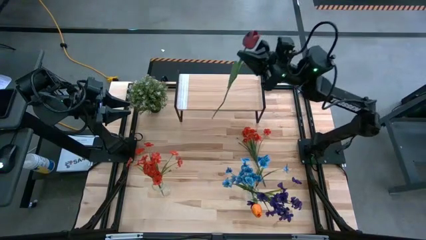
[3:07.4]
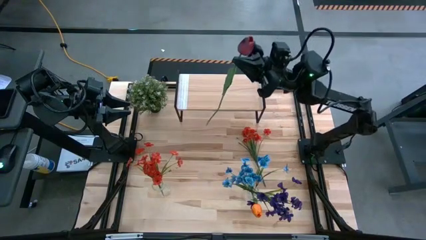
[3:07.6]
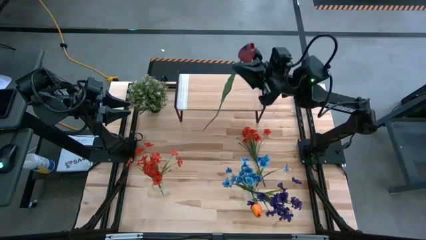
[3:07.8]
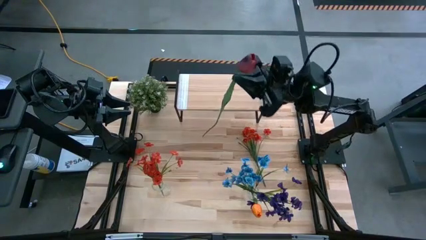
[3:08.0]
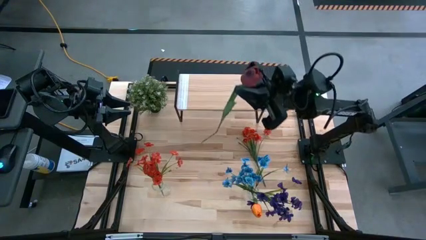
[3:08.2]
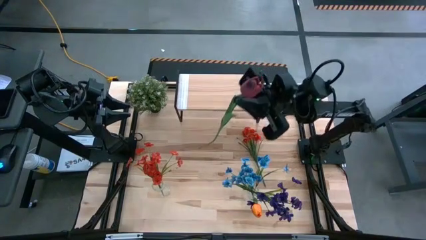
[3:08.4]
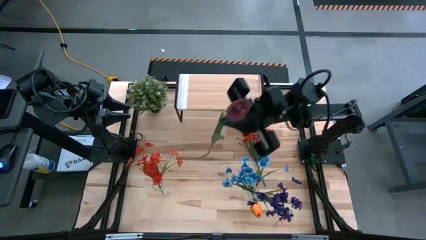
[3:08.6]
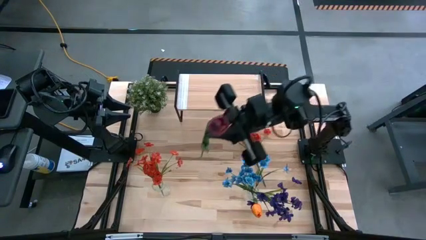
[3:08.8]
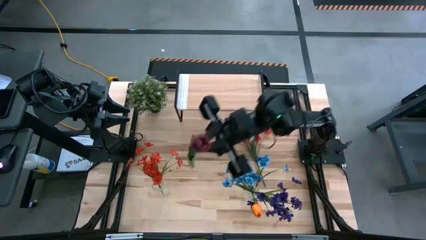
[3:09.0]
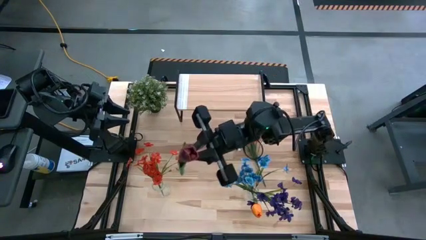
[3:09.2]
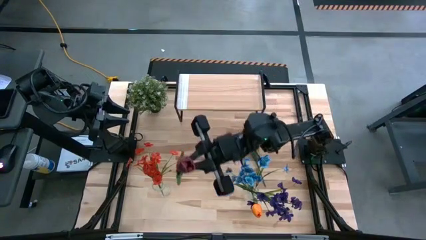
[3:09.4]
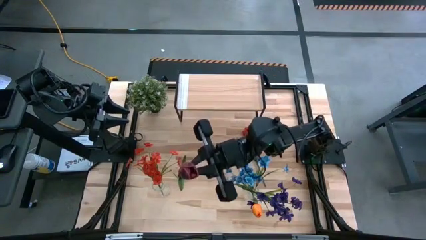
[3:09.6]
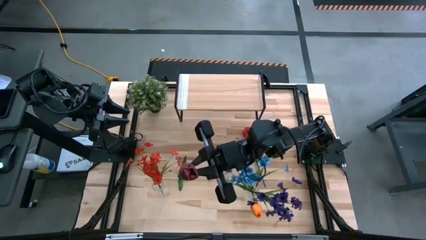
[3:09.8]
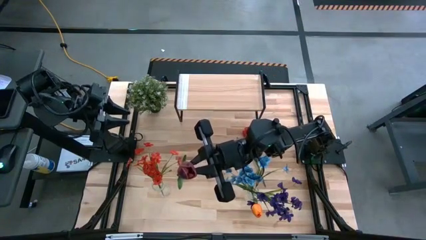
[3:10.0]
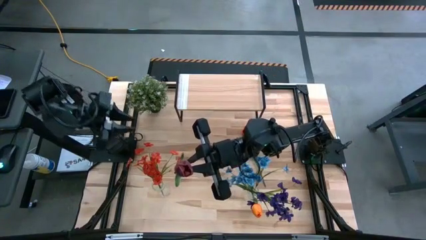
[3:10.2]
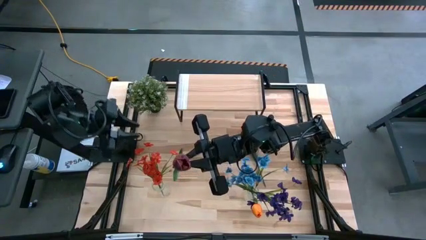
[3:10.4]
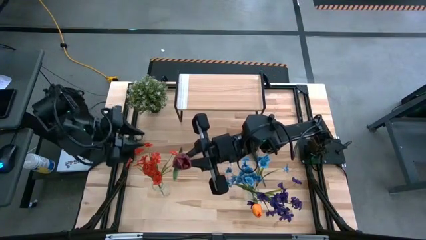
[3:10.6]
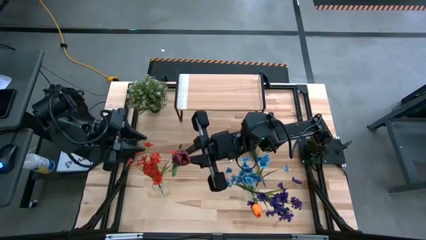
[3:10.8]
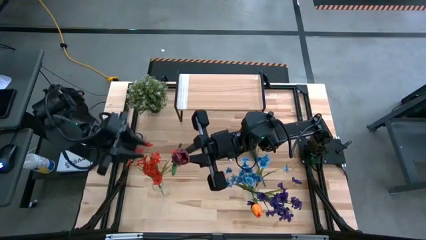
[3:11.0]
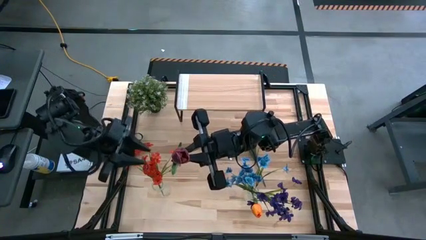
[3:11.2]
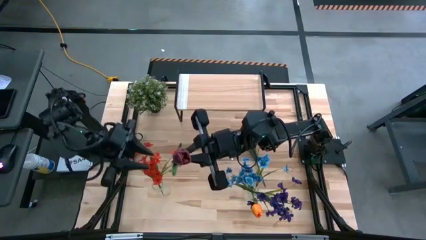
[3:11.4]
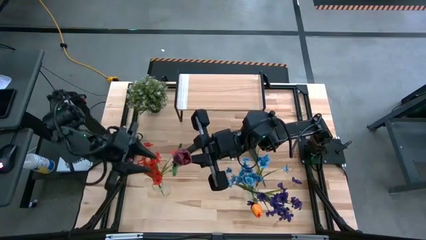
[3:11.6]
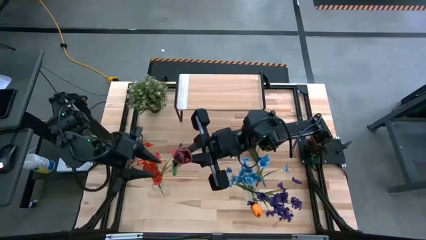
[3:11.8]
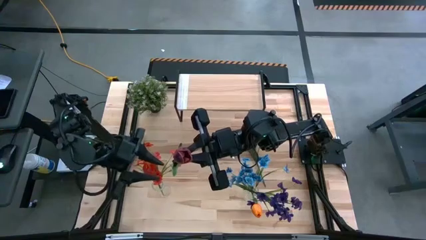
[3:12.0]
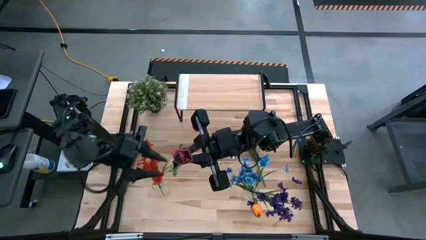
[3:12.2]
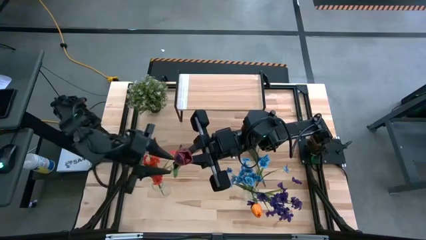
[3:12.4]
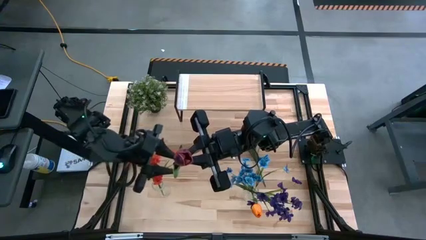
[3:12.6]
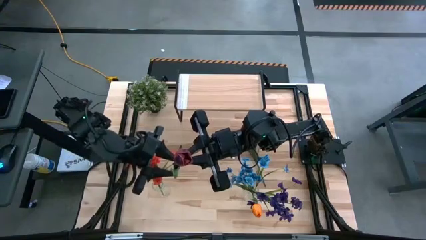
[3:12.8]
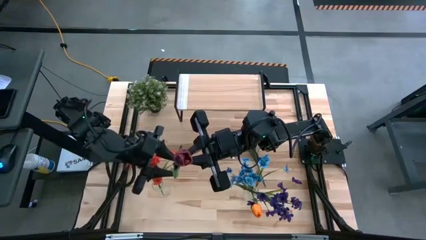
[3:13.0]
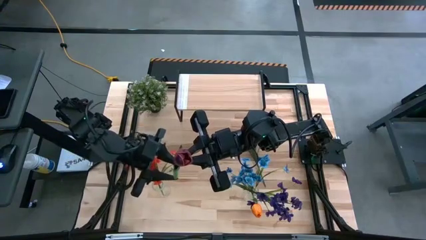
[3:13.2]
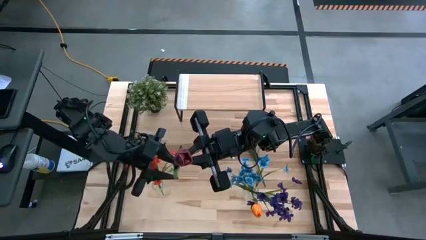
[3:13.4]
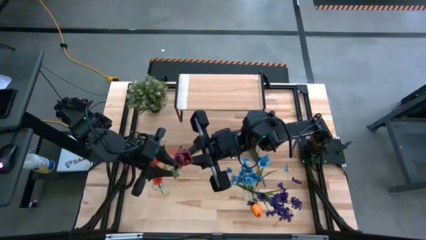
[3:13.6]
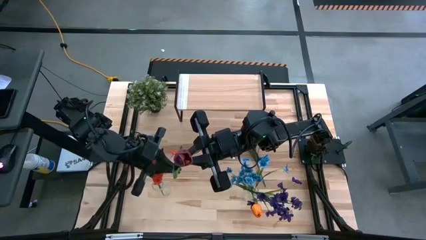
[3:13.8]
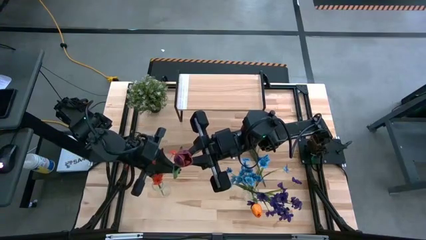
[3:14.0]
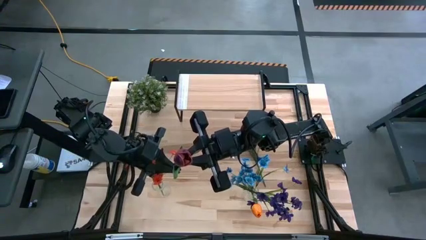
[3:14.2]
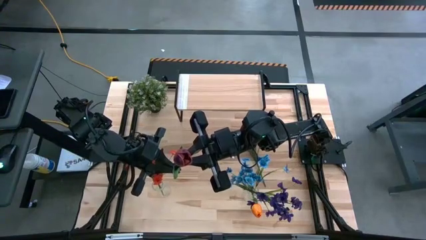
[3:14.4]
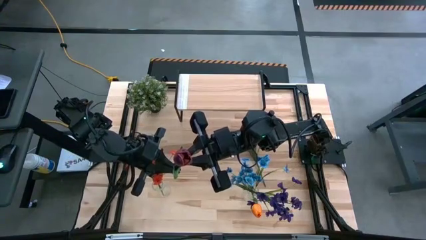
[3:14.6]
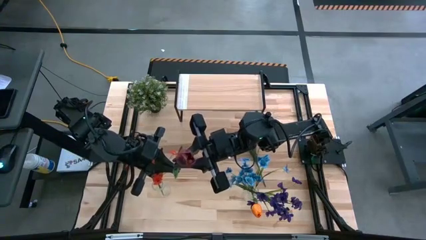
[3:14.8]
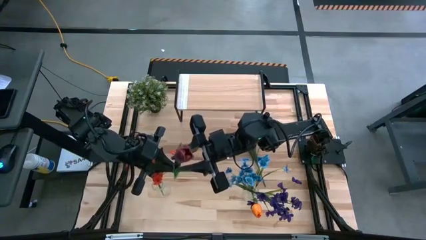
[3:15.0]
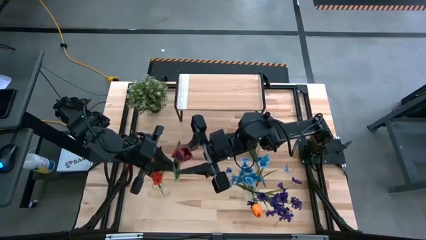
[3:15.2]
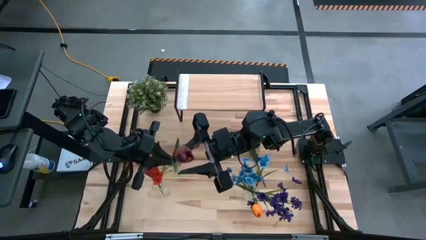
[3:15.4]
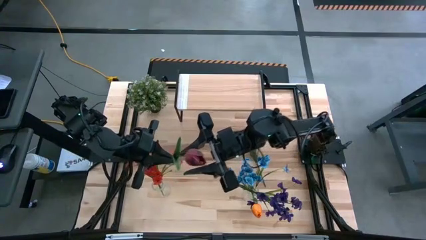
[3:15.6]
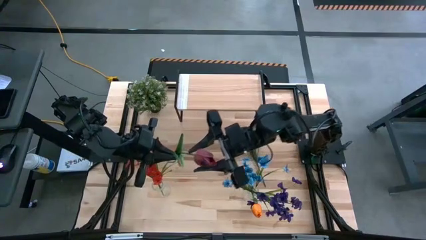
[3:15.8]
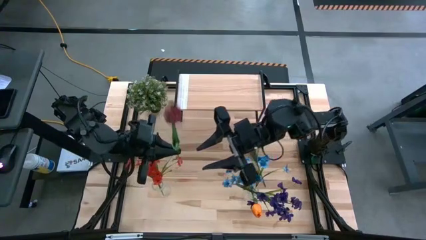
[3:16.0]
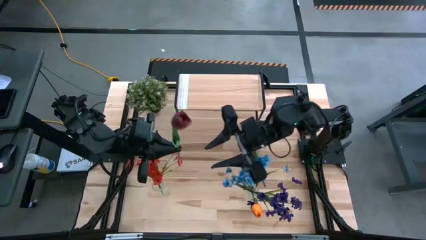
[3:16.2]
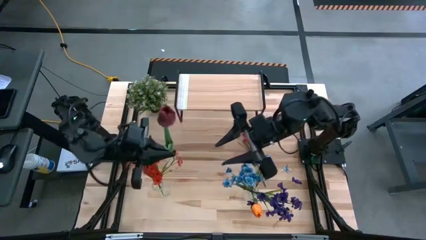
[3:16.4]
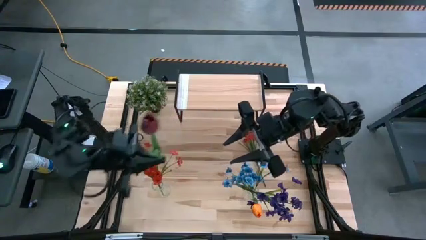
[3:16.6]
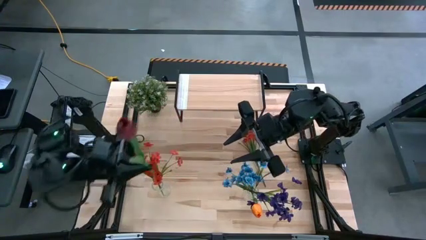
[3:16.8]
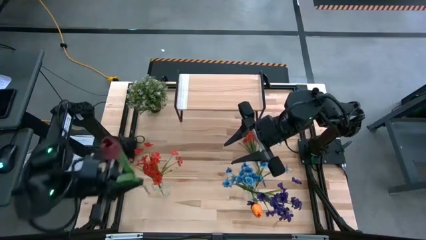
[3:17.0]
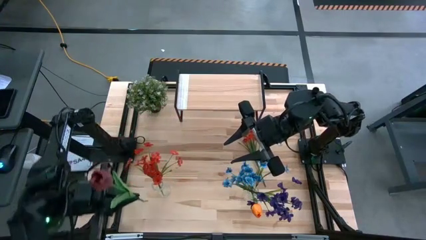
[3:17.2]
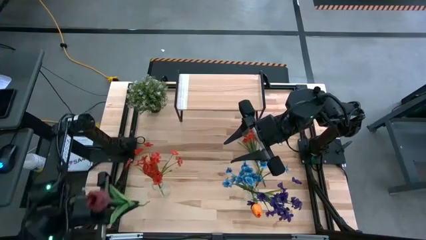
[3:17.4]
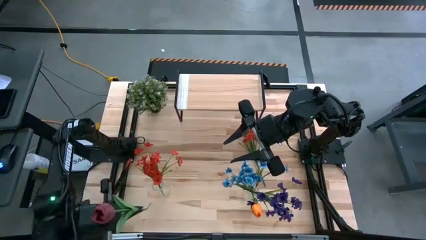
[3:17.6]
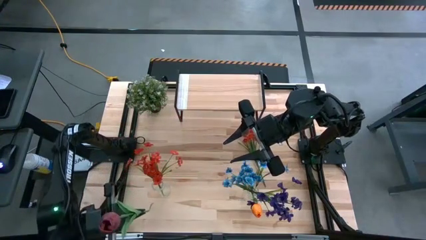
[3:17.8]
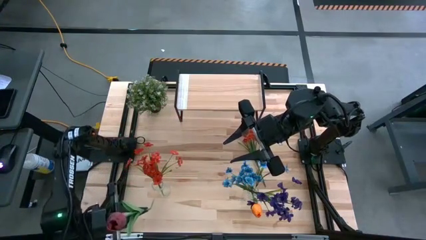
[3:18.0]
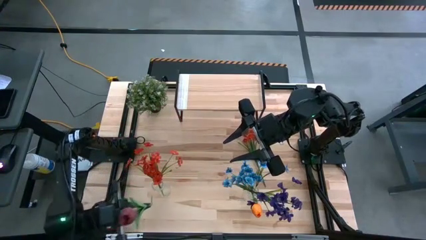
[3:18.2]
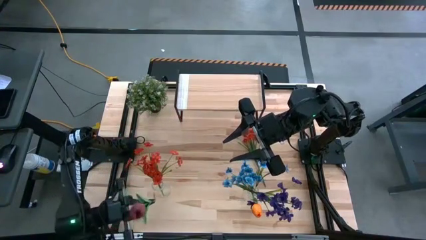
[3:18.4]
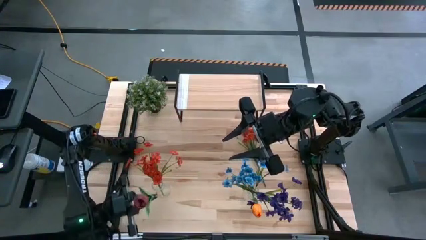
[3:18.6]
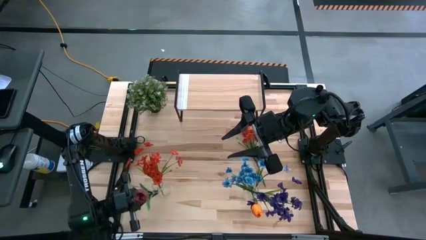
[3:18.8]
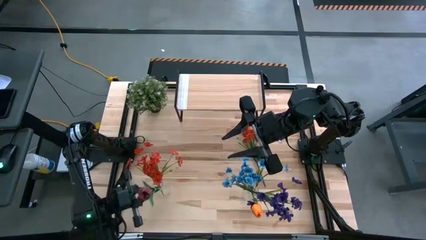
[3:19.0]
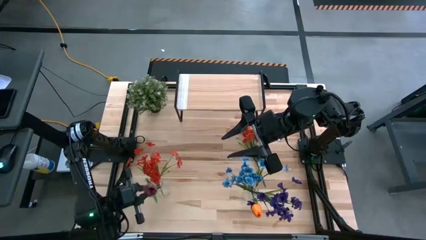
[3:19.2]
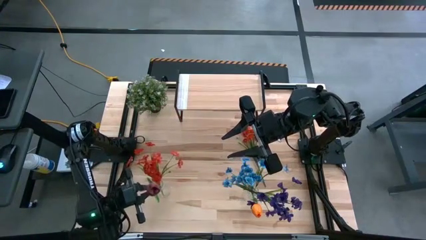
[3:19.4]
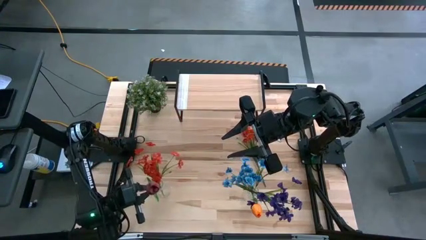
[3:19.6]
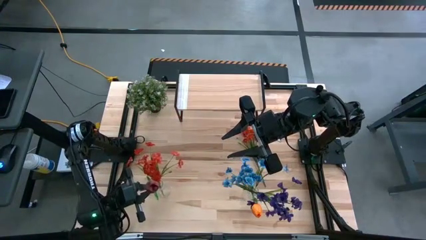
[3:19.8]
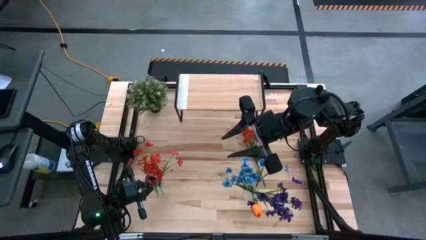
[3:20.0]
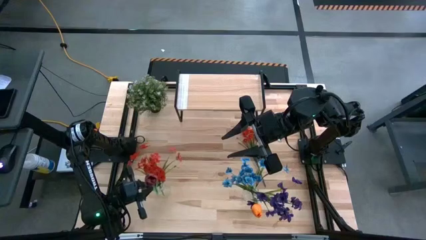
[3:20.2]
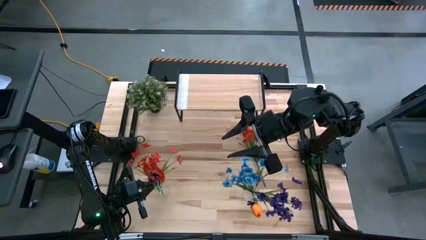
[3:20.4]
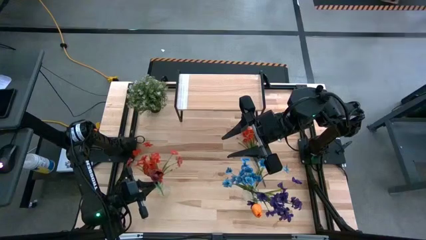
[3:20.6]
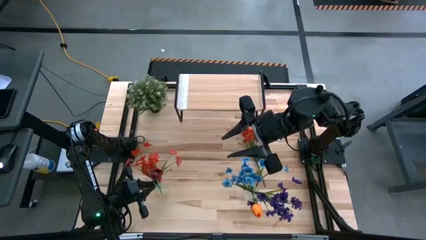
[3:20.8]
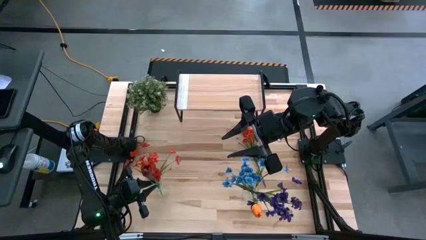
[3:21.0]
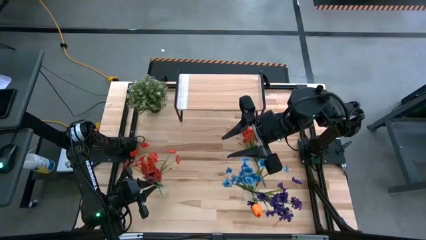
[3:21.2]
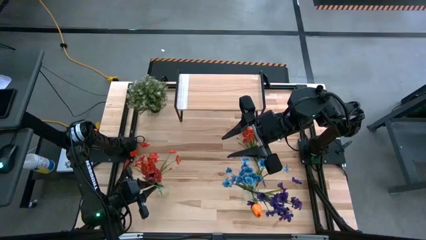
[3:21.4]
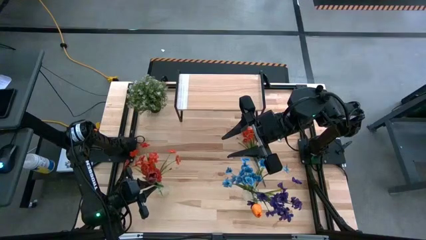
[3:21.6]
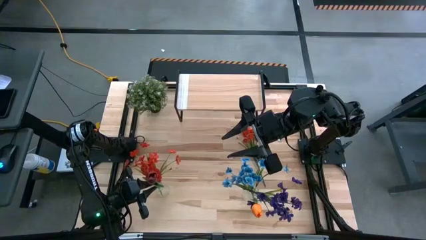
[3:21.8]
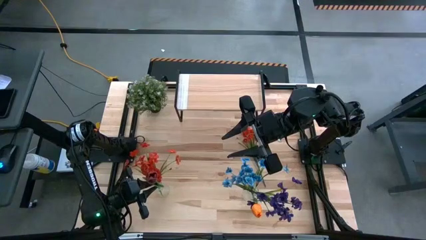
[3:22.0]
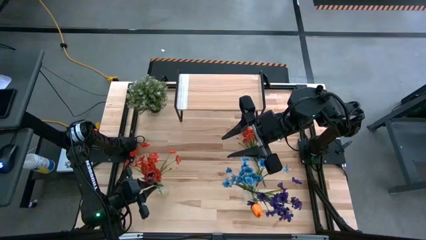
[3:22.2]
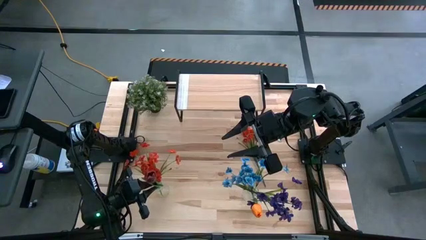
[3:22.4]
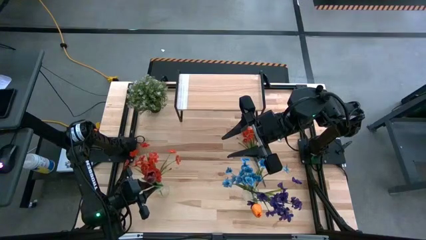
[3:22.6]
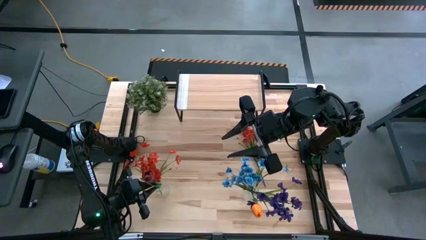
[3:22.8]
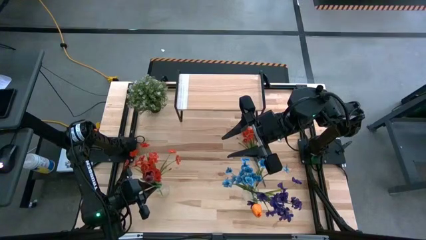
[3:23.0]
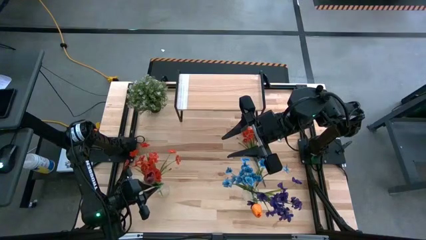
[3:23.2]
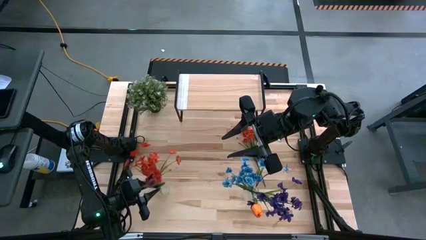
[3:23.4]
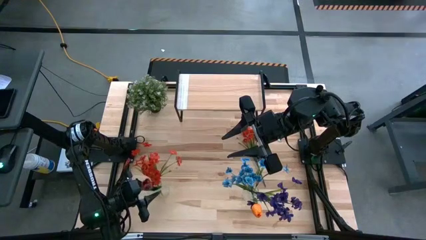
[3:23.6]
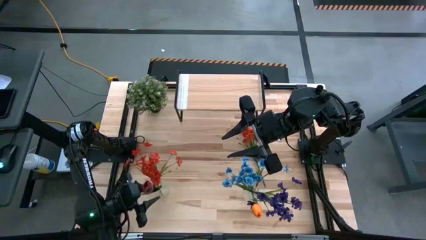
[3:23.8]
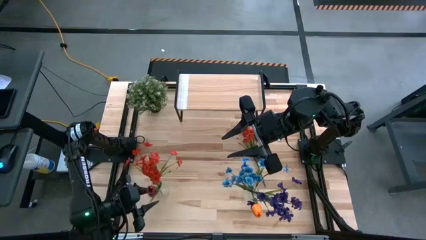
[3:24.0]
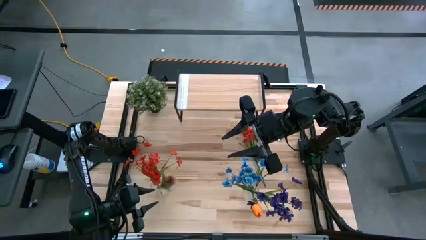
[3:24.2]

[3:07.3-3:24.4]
Task: Pick and place flowers into a vace then onto a shelf
Put the red flower into the left transparent vase
